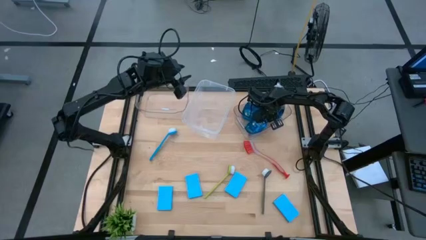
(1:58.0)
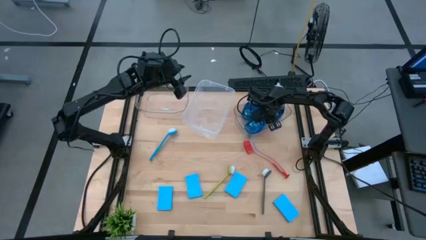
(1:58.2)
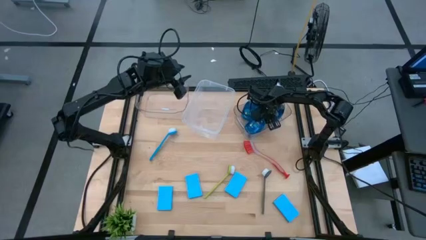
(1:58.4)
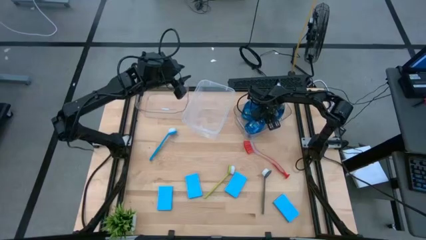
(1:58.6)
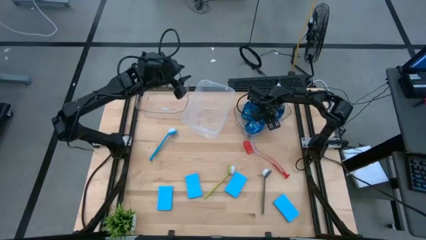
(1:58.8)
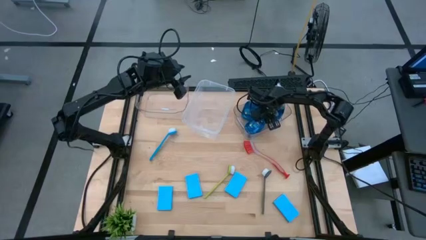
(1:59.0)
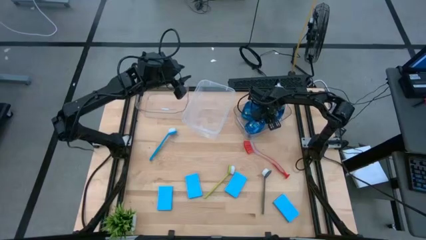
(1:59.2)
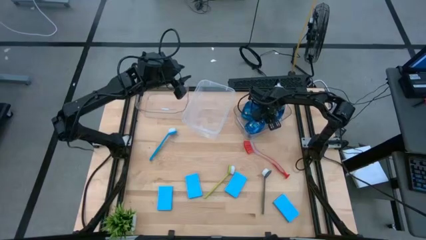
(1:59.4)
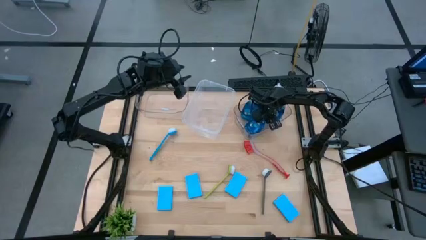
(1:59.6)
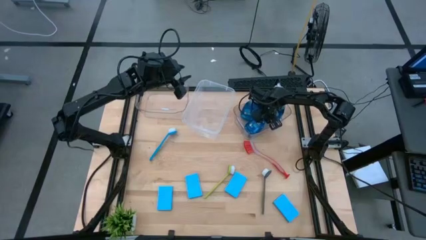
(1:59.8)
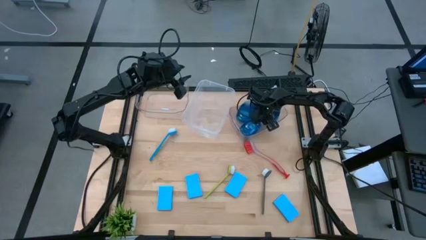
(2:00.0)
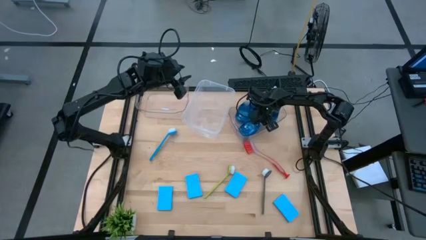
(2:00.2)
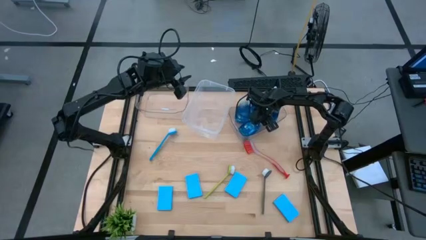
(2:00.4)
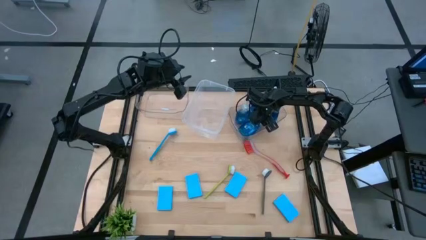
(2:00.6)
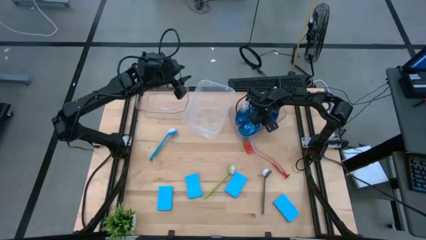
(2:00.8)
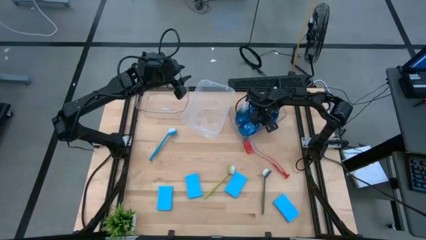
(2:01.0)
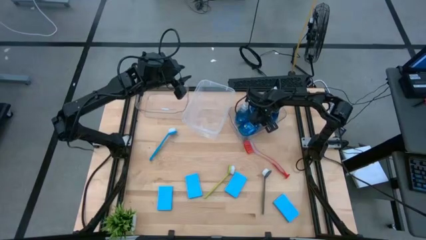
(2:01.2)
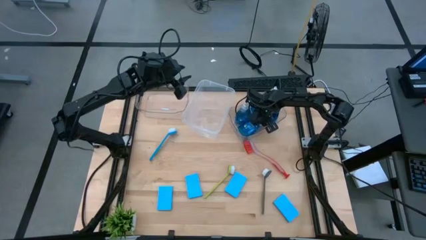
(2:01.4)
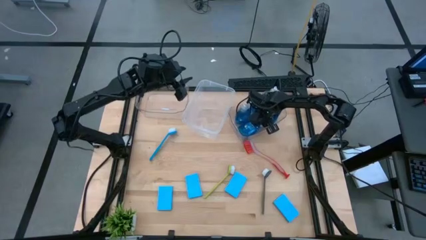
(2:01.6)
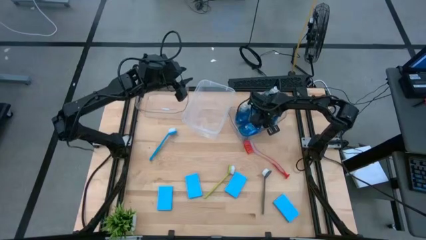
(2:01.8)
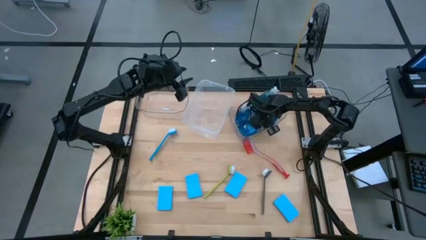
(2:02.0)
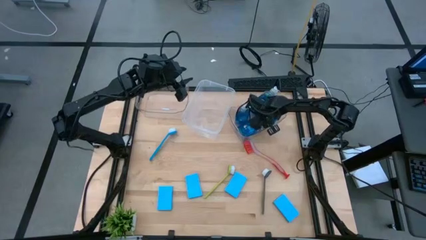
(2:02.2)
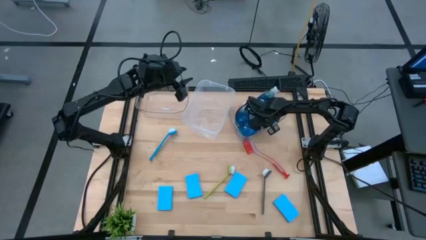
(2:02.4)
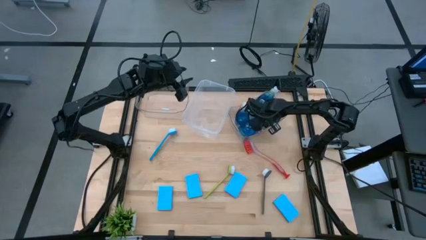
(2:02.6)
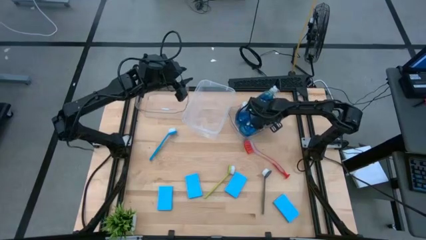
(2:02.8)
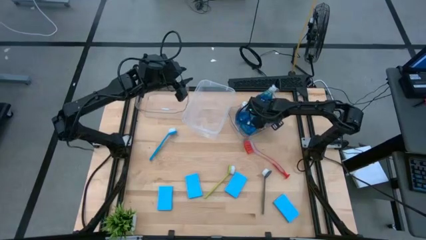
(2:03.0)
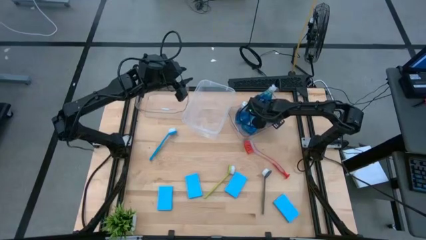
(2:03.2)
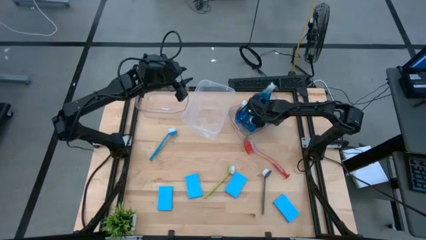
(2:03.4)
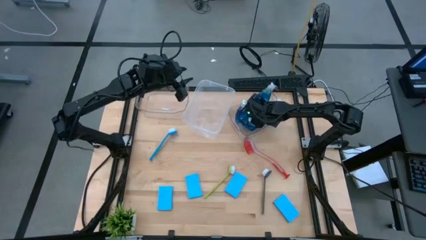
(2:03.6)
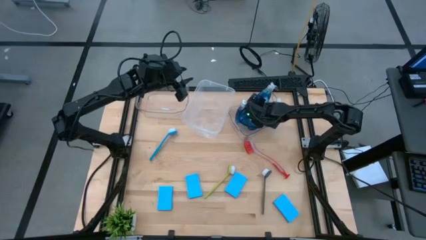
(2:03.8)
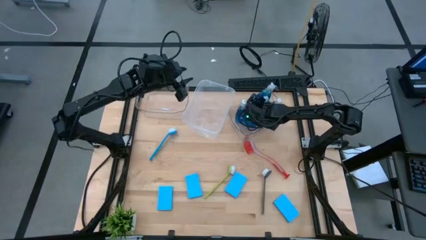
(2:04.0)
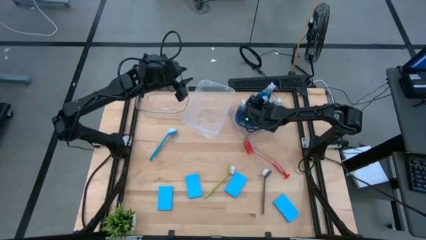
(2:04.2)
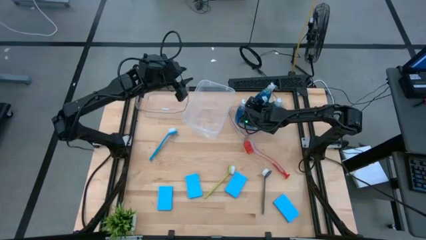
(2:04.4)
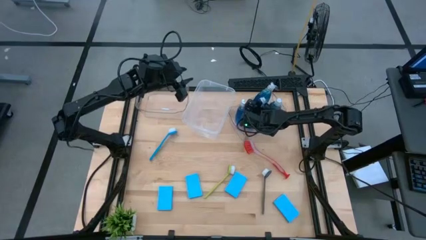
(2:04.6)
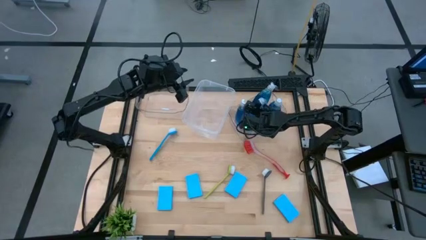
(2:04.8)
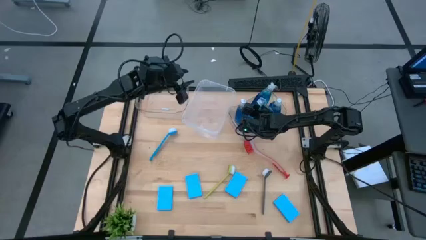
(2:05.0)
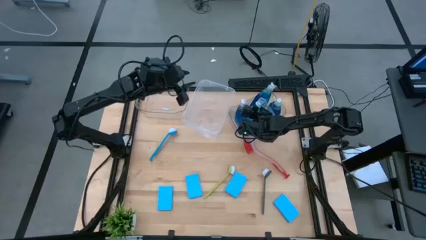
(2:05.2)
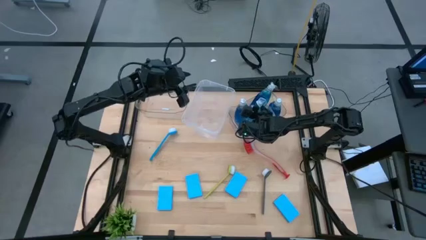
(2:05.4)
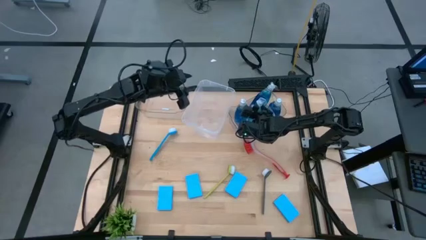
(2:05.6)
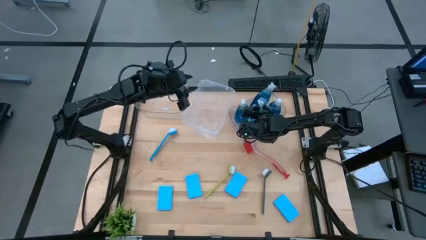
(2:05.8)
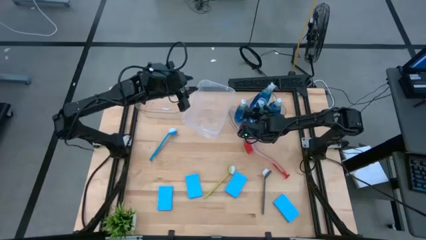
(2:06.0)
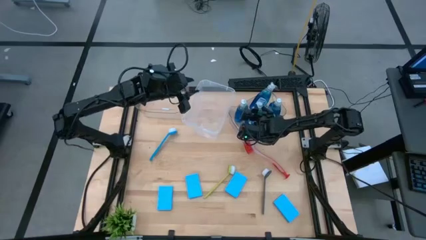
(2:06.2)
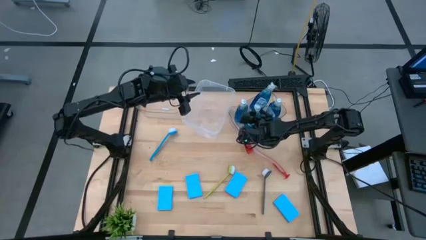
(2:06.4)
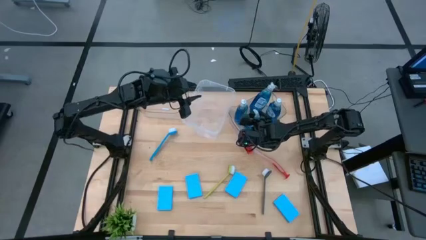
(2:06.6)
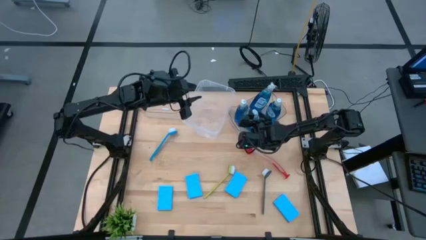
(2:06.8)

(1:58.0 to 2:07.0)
Task: Pick & Place Kitchen Sink Supplies
Put the blue soap dispenser into the right transparent bin

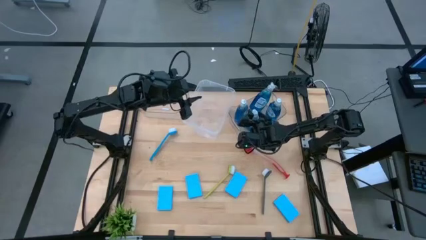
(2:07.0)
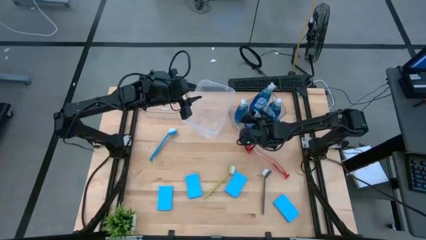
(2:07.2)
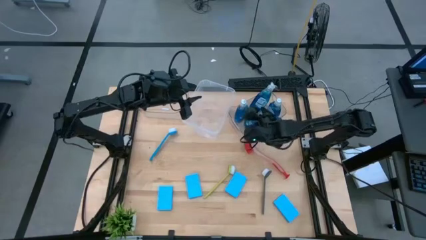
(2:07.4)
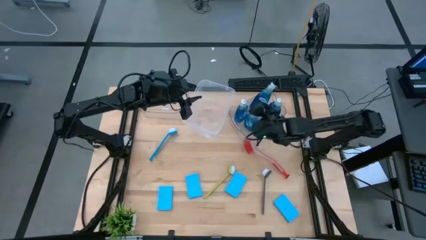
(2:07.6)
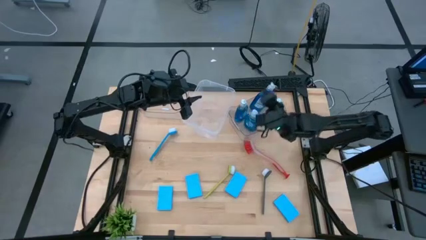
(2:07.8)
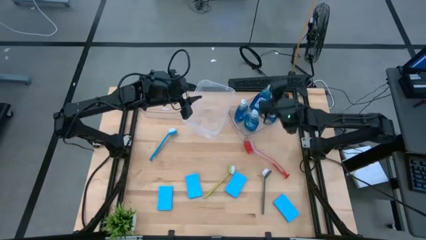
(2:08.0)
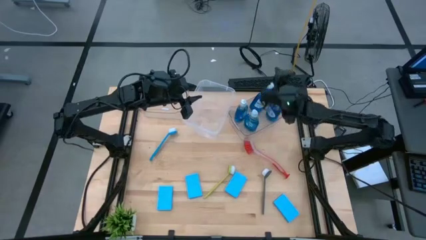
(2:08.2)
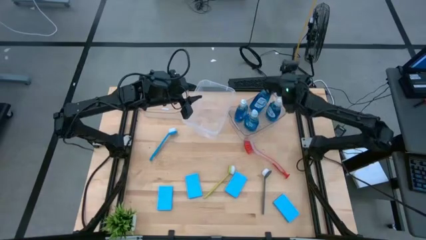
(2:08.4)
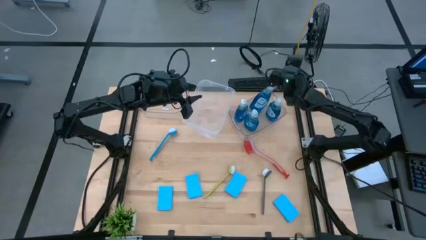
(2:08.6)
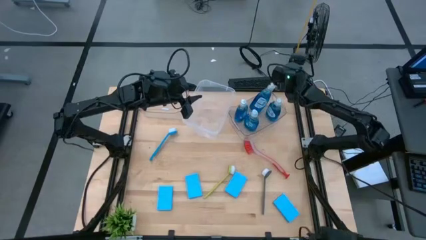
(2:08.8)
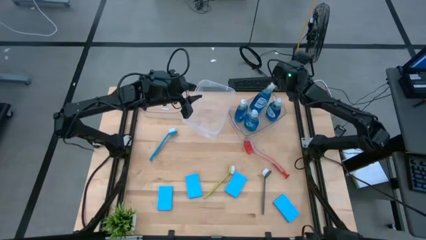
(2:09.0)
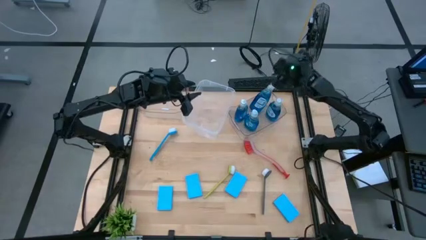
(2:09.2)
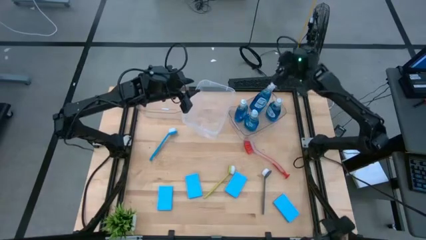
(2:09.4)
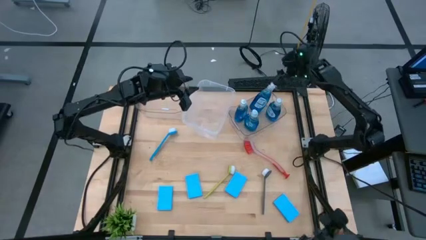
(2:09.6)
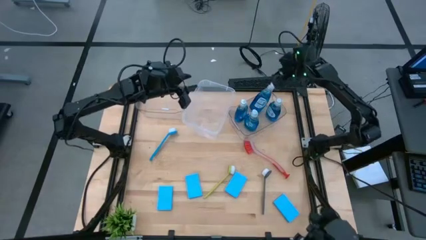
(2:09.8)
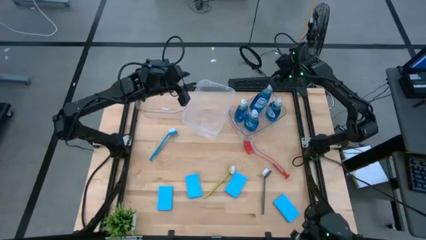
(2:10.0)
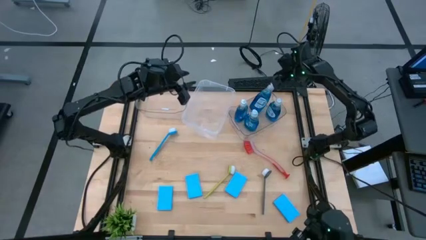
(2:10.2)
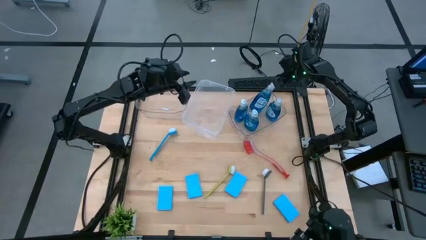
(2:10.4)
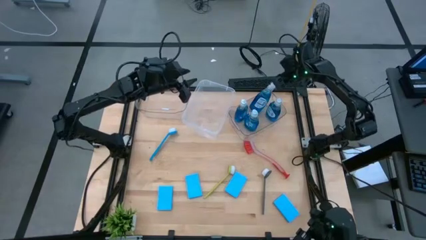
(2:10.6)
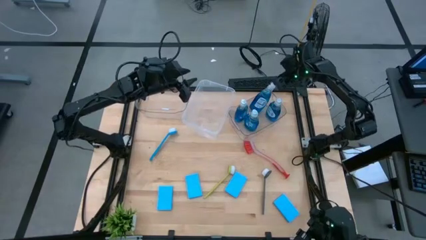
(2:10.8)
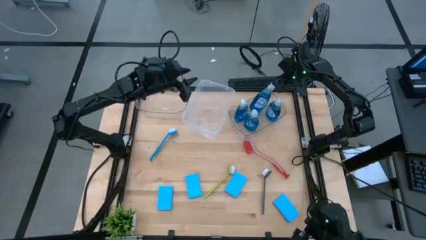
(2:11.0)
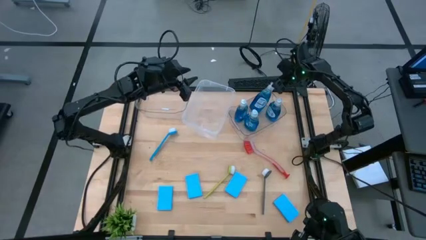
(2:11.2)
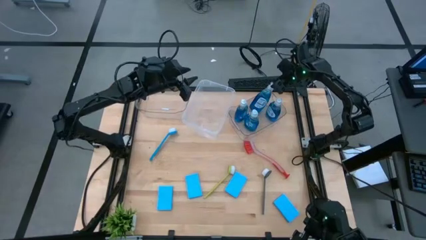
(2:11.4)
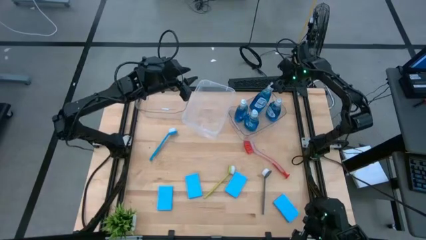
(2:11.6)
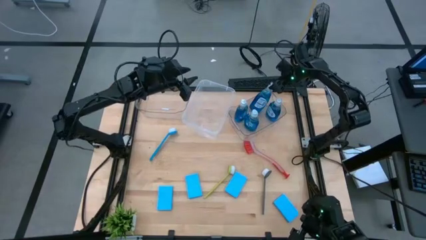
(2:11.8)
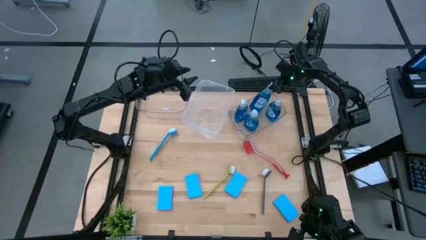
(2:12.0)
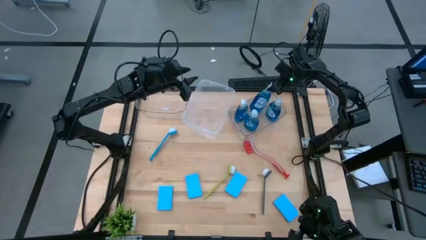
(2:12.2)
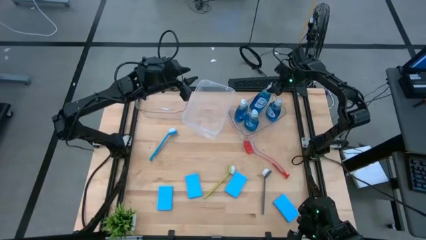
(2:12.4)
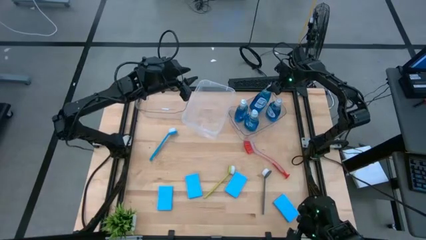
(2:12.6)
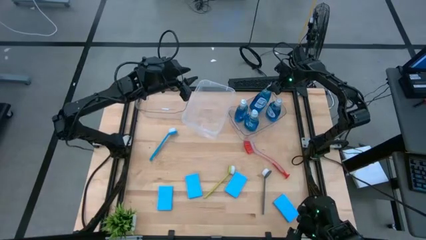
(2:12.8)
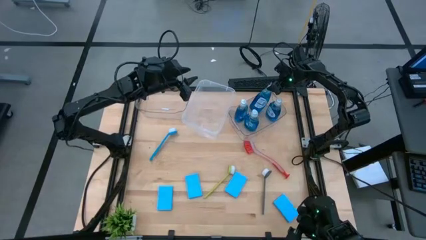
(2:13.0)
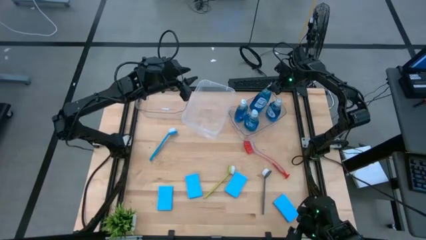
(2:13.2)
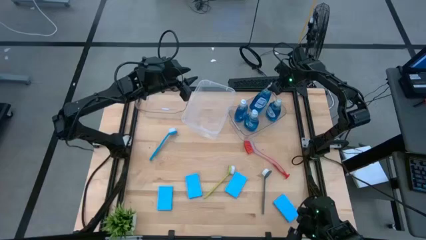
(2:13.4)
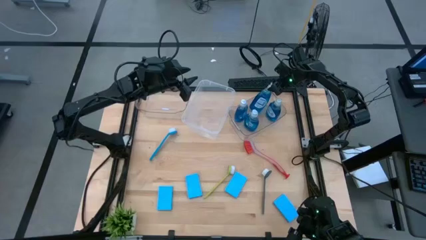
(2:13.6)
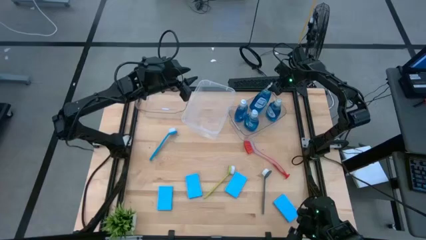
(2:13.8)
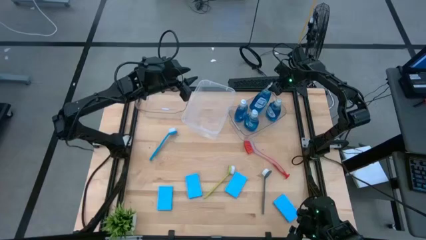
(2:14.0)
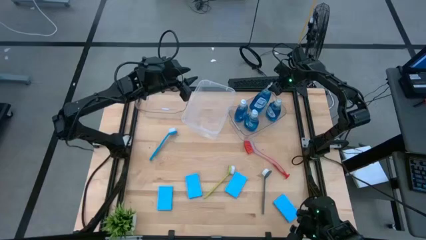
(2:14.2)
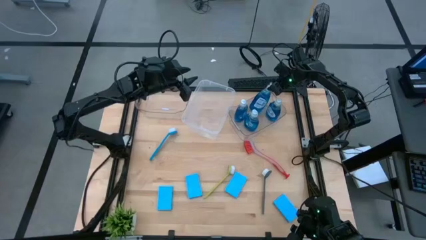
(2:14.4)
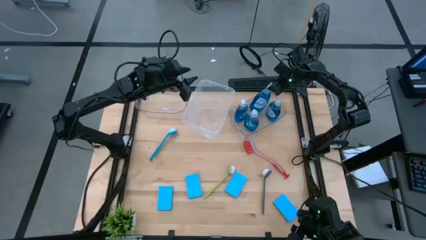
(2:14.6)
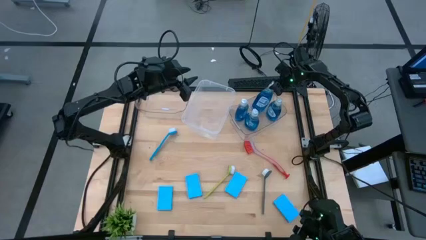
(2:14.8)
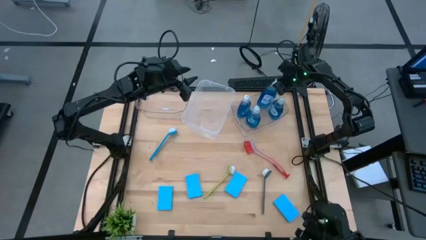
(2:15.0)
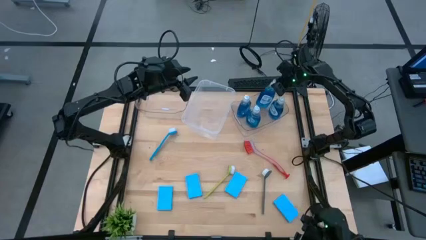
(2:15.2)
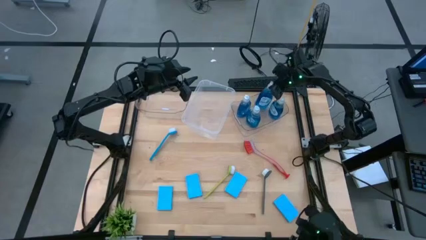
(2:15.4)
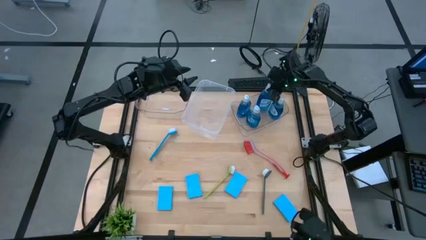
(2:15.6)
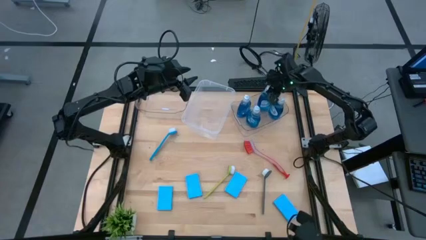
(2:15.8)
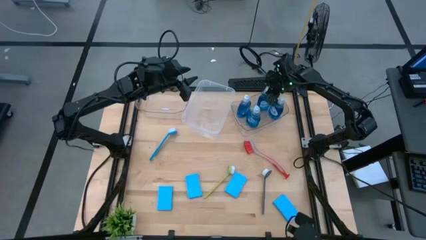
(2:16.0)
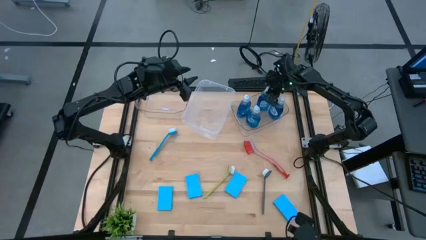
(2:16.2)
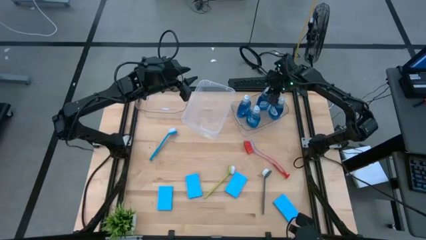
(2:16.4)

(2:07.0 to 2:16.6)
Adjust the blue soap dispenser in the right transparent bin
